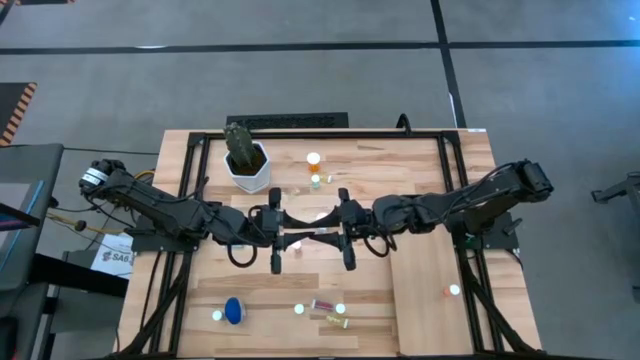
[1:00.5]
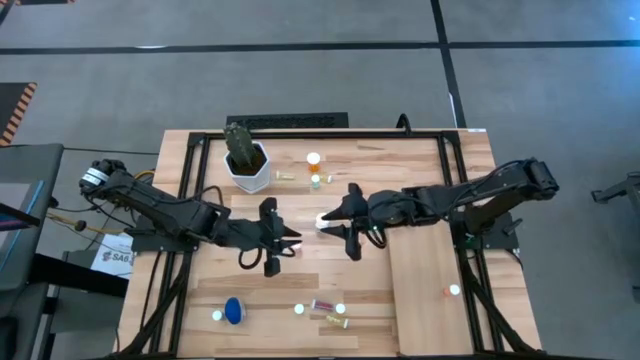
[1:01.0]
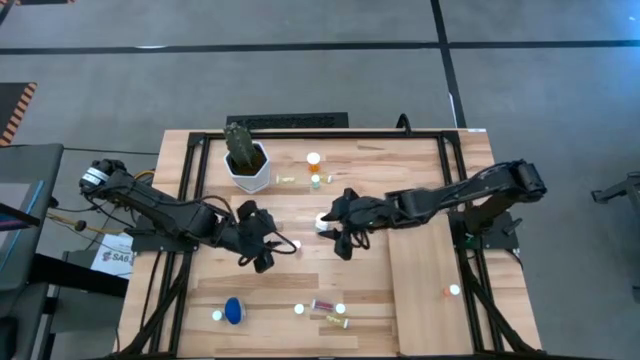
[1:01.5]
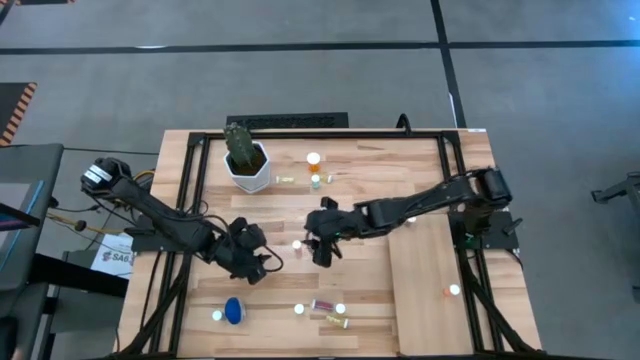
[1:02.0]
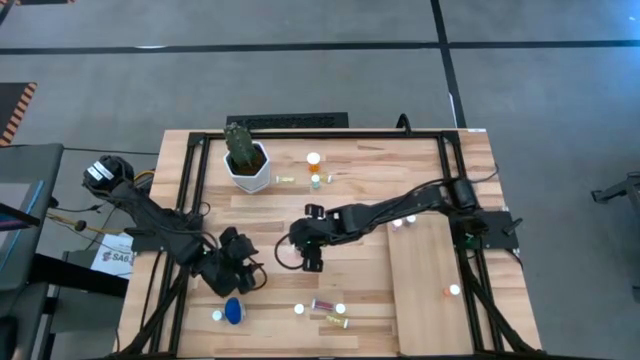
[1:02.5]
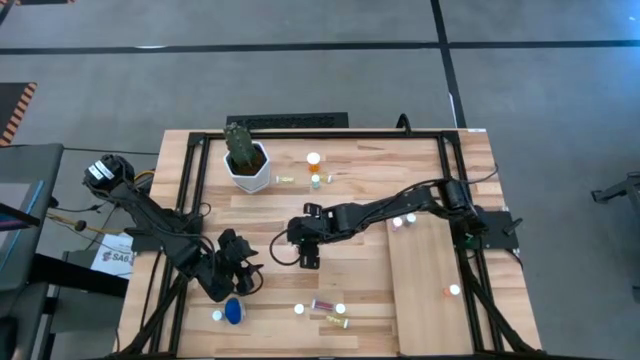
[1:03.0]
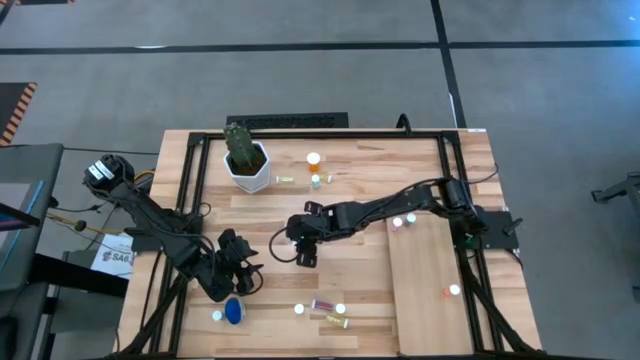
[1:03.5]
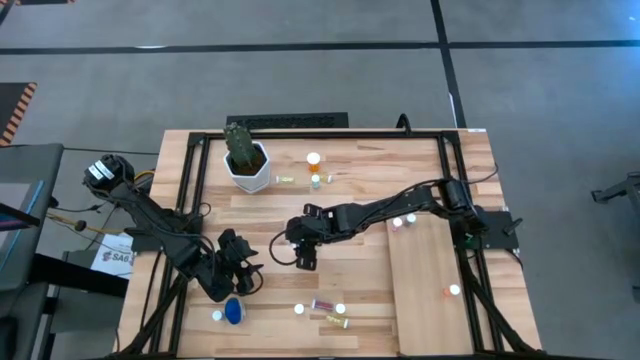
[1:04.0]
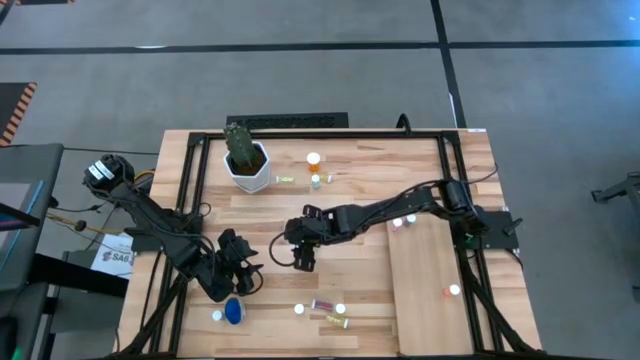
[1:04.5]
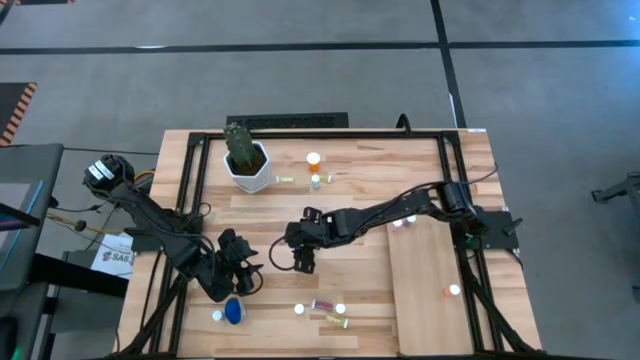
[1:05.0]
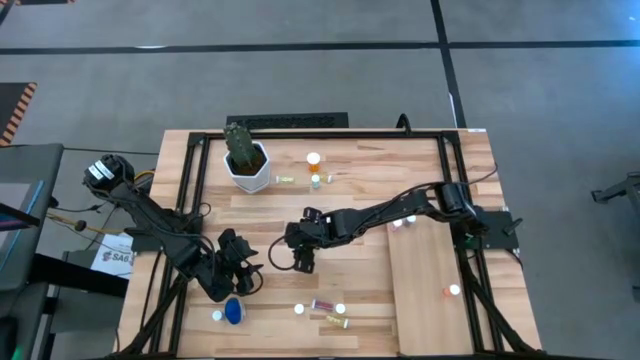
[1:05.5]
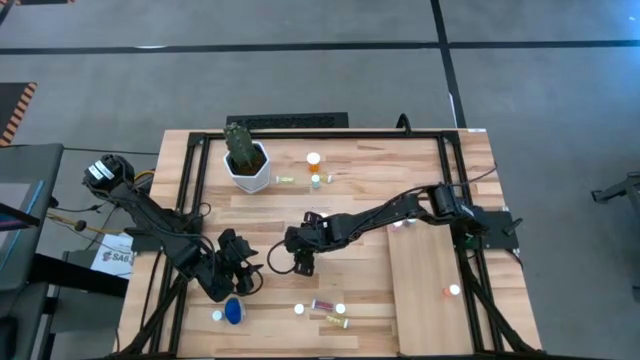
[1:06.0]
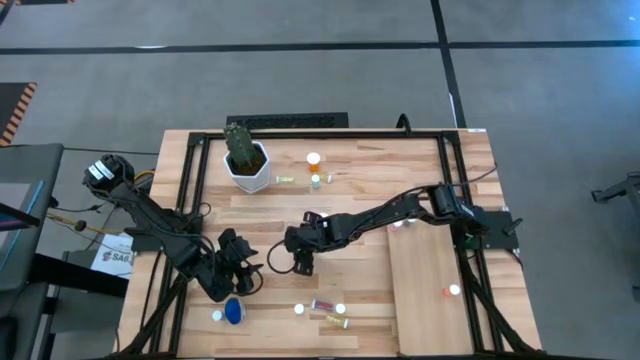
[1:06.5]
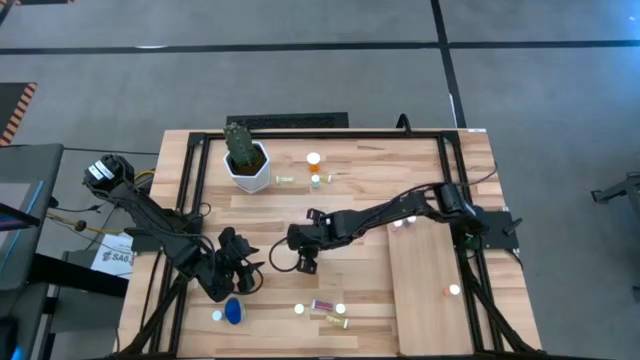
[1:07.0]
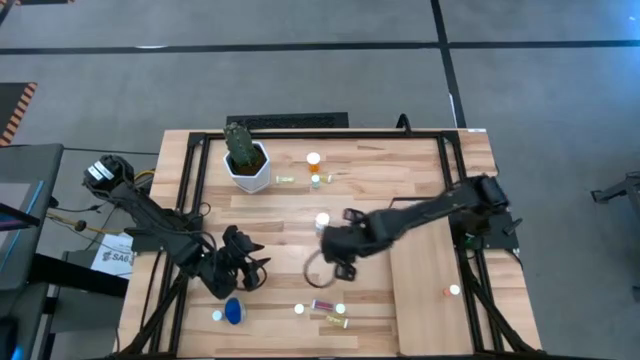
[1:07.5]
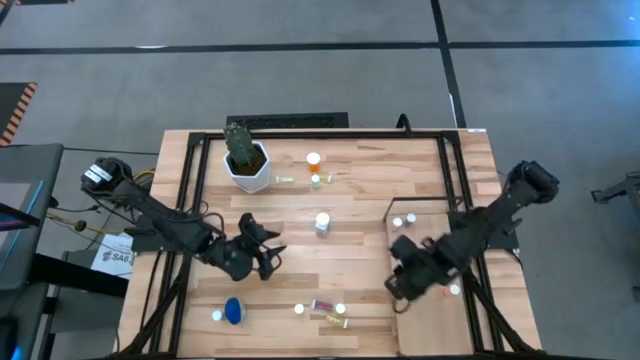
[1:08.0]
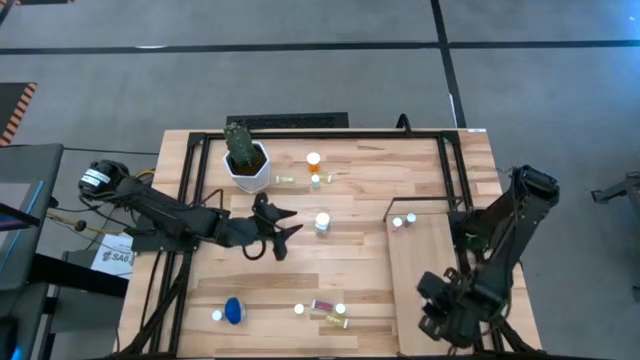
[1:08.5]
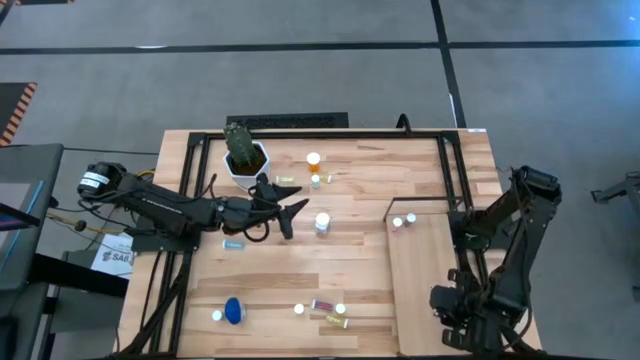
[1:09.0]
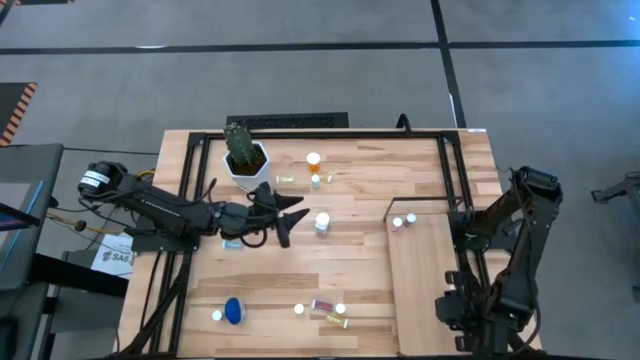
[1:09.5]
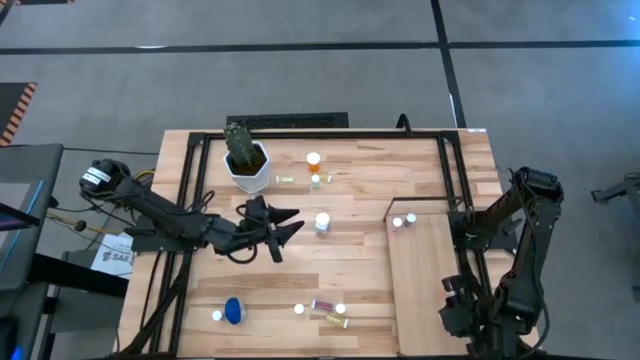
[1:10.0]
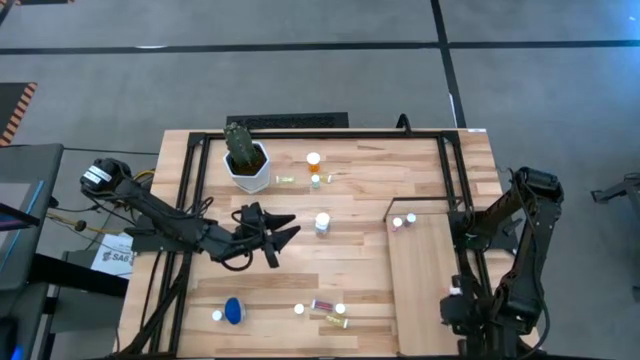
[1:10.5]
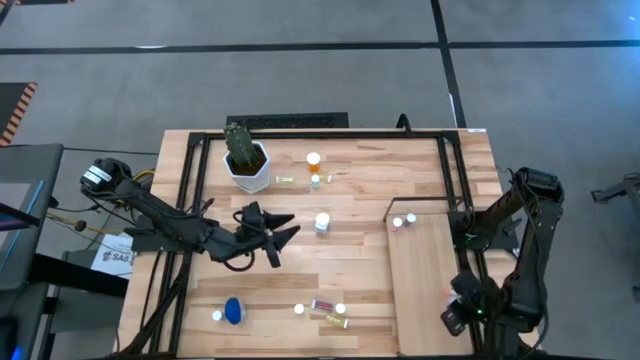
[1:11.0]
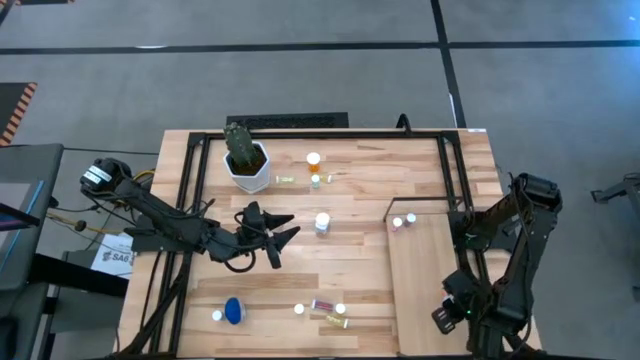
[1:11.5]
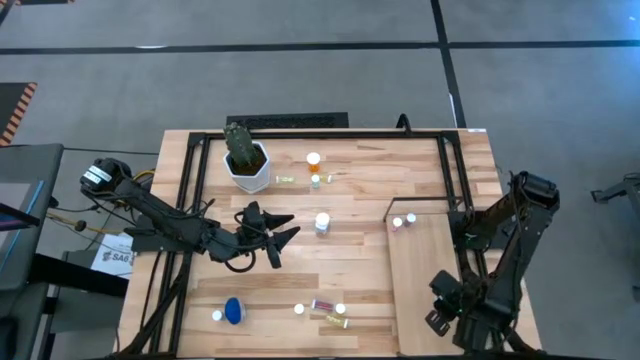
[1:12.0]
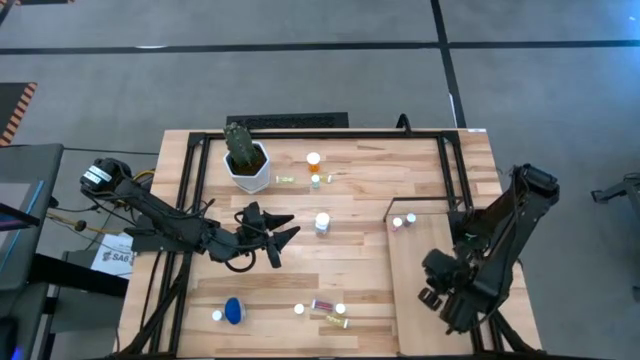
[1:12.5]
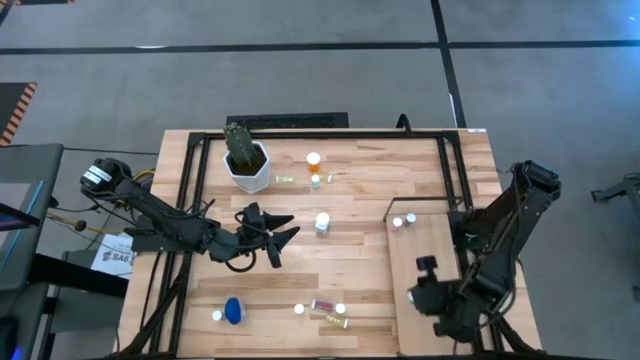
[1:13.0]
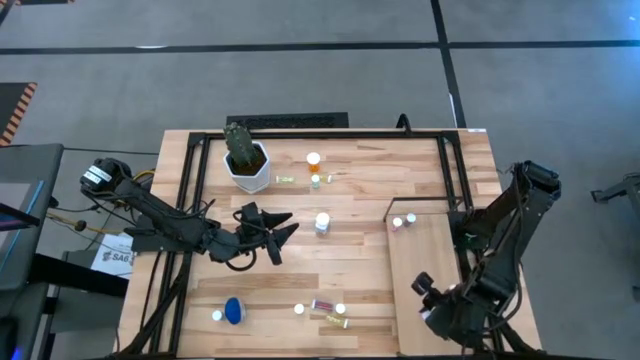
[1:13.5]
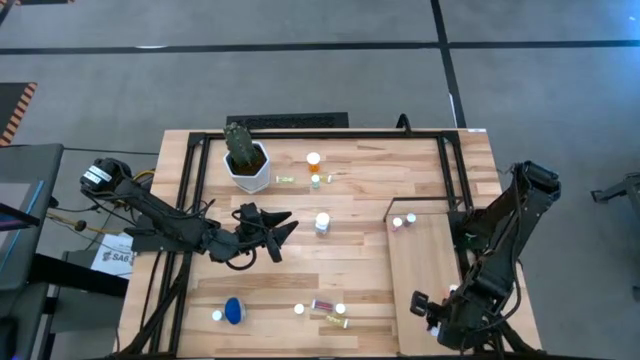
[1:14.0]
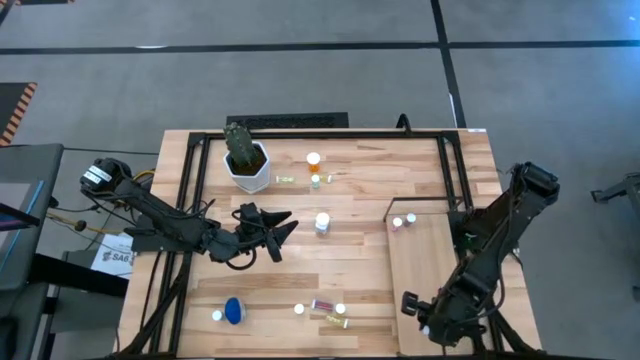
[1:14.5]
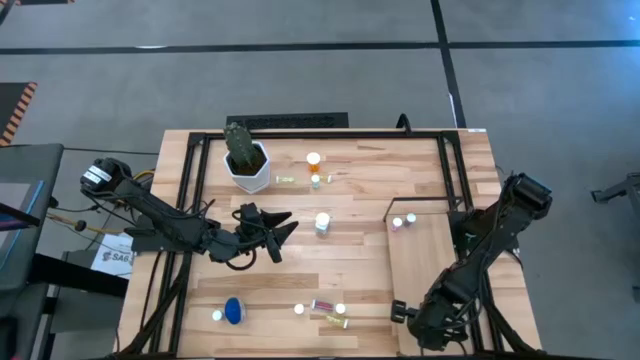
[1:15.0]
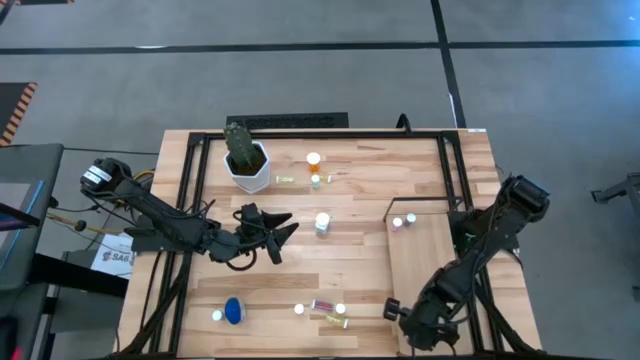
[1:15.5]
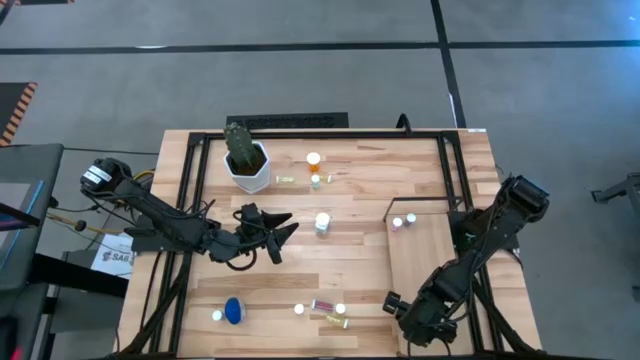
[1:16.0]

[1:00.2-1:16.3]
Task: Pick and place medicine bottles onto shelf by color
Put the pink pill bottle on the shelf

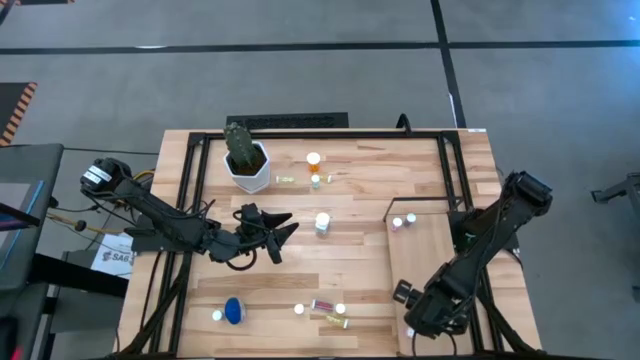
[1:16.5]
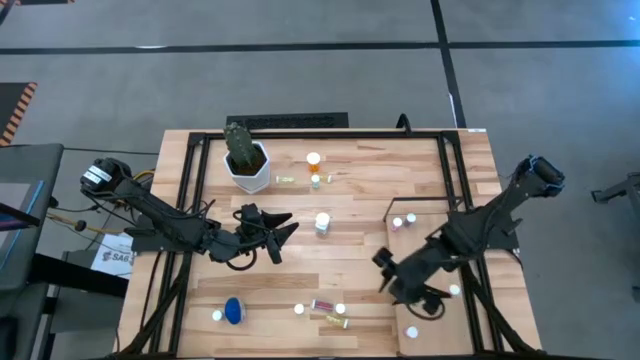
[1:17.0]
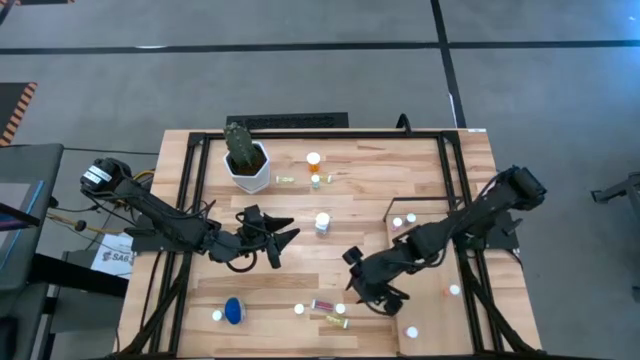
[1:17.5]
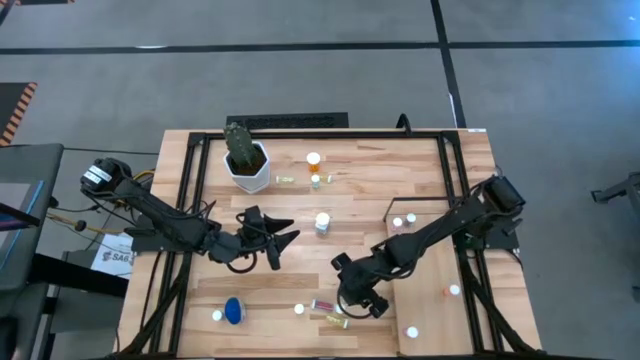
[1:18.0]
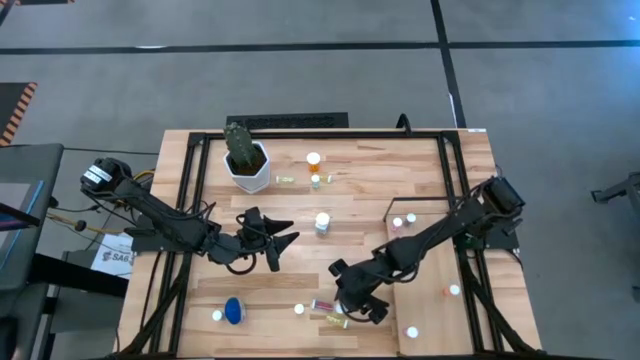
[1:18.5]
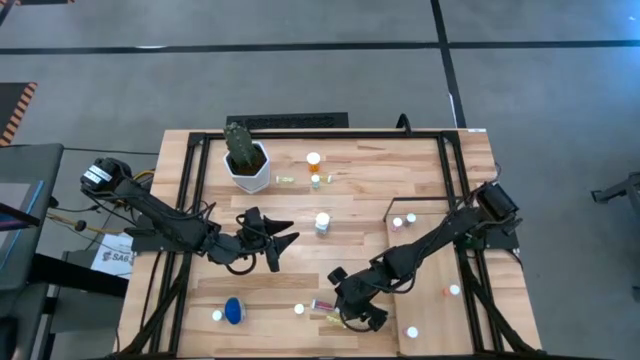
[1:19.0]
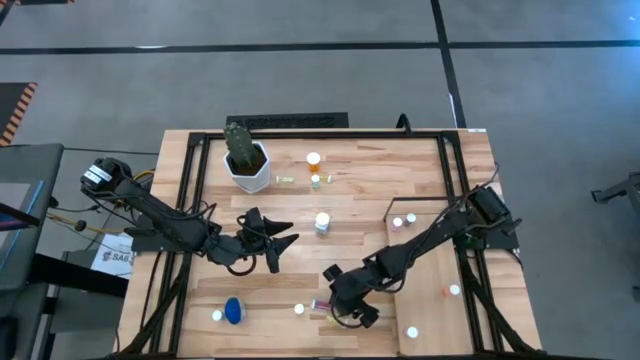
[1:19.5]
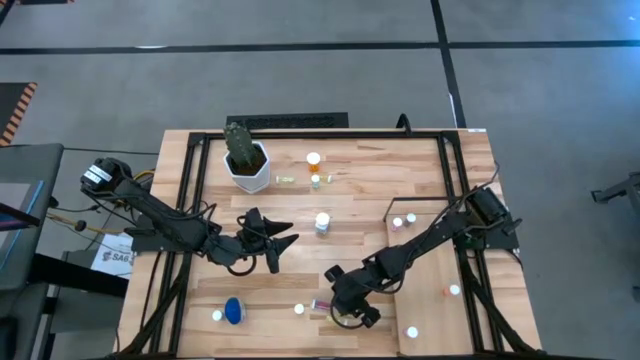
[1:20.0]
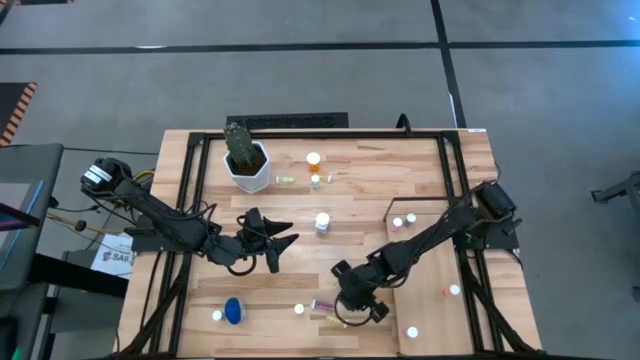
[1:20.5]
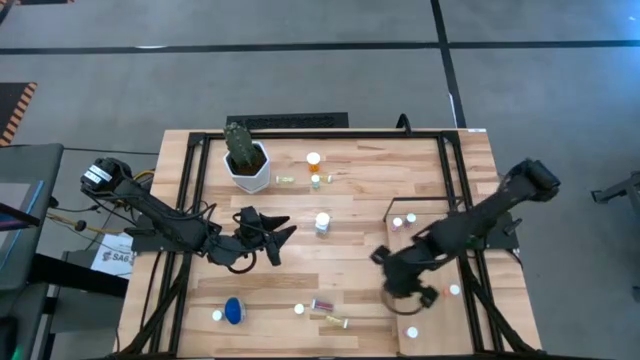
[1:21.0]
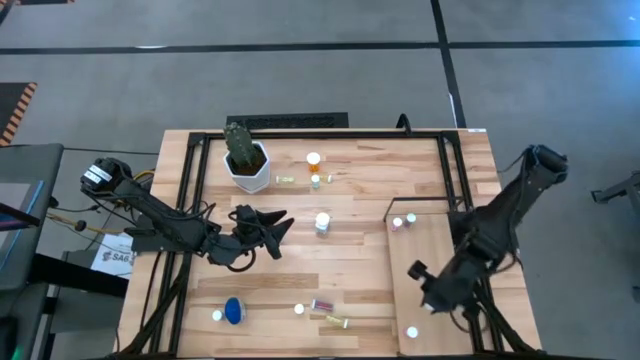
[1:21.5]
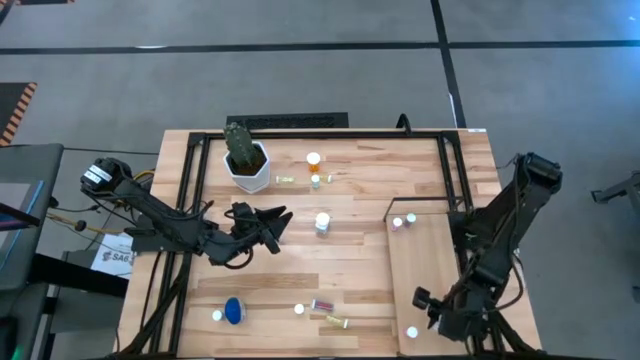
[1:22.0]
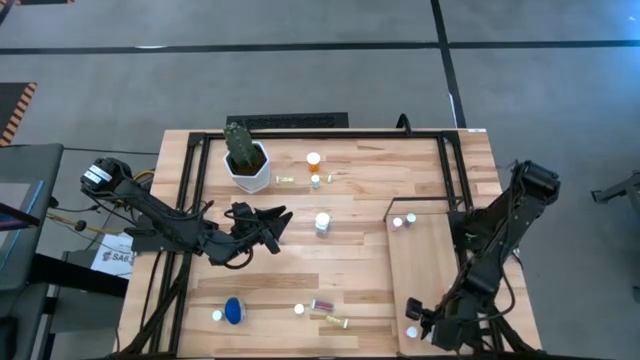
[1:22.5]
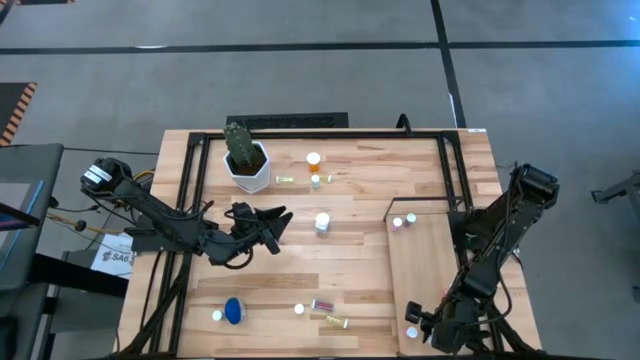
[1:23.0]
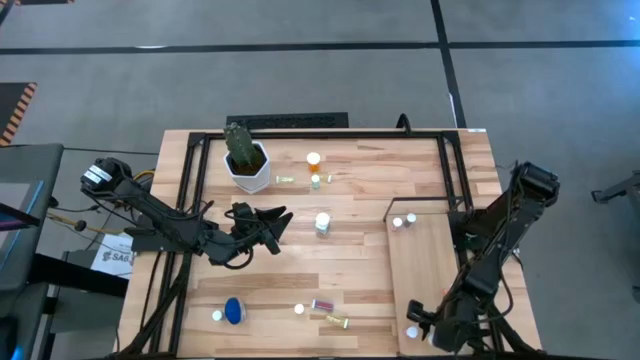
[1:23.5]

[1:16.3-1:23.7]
Put the yellow pill bottle on the shelf
